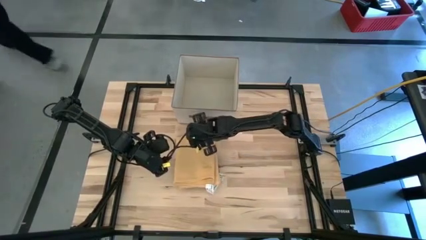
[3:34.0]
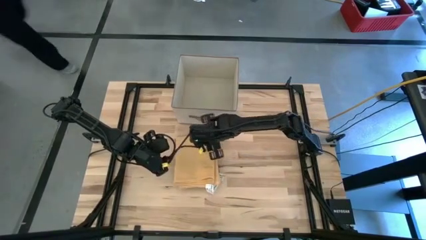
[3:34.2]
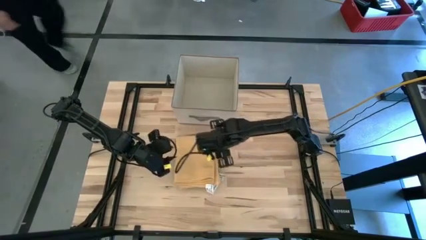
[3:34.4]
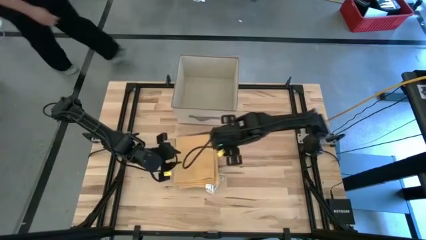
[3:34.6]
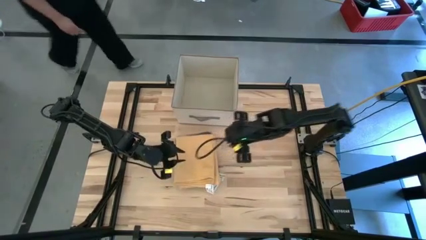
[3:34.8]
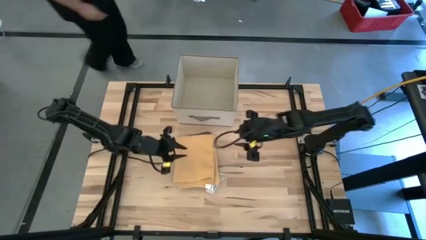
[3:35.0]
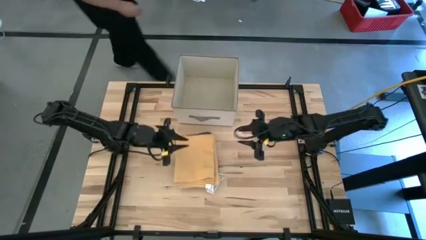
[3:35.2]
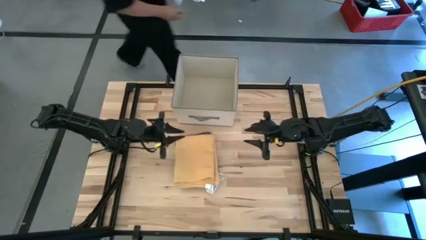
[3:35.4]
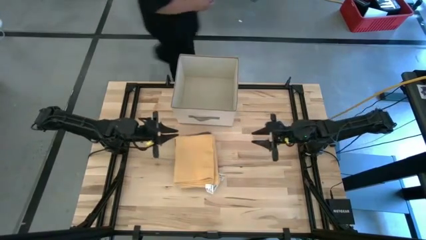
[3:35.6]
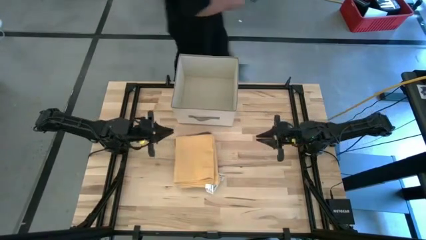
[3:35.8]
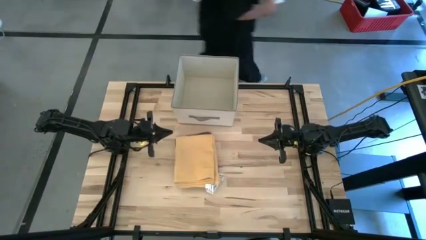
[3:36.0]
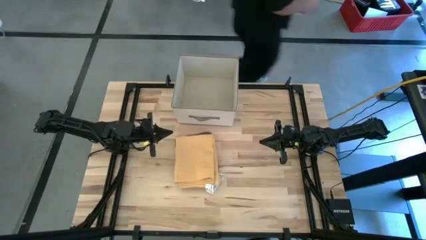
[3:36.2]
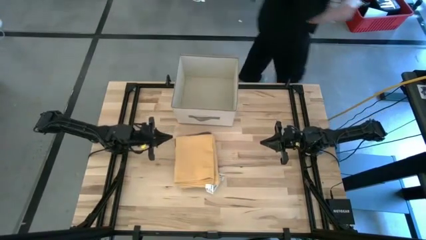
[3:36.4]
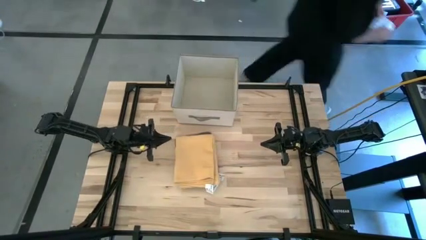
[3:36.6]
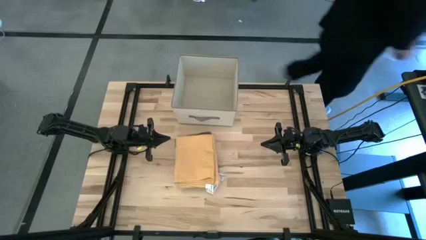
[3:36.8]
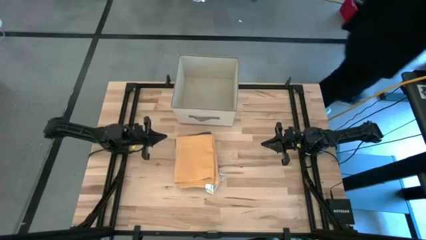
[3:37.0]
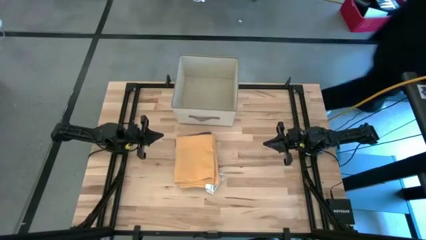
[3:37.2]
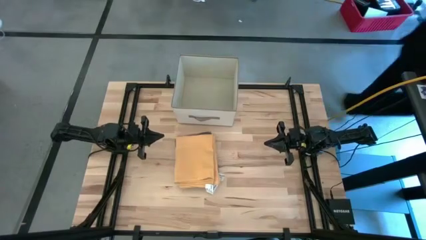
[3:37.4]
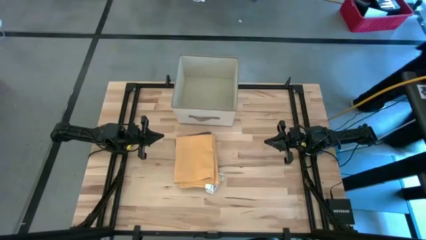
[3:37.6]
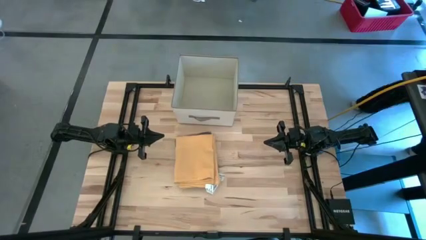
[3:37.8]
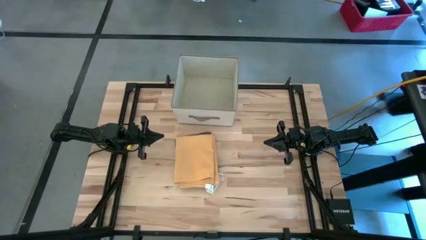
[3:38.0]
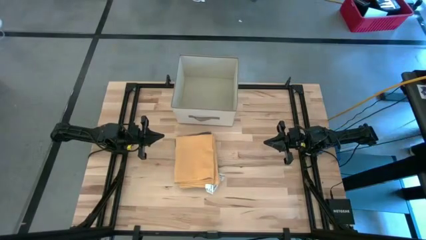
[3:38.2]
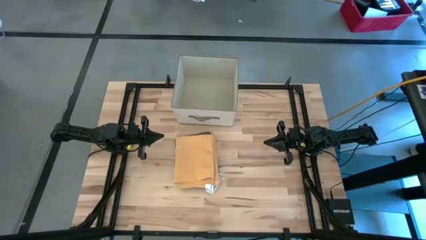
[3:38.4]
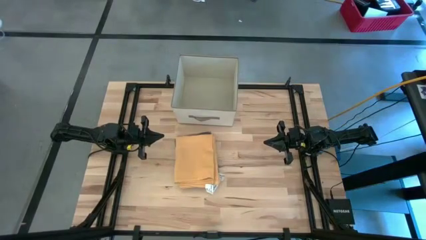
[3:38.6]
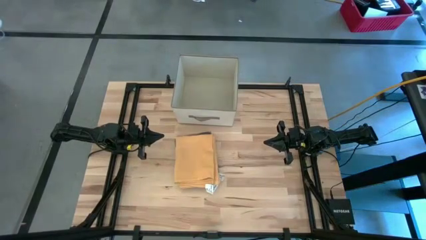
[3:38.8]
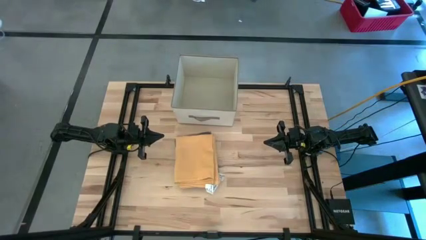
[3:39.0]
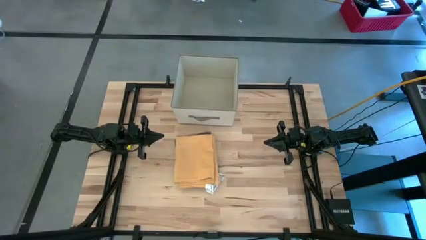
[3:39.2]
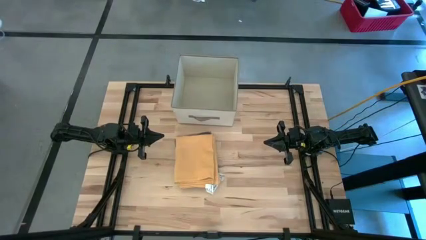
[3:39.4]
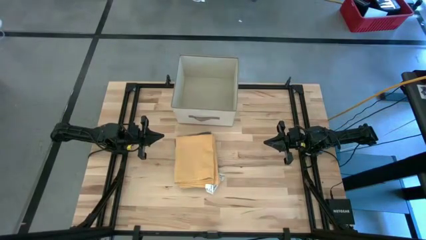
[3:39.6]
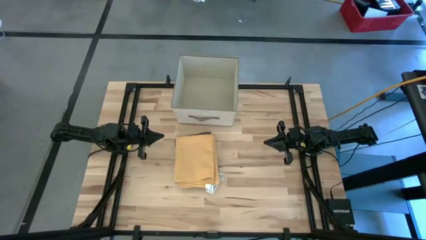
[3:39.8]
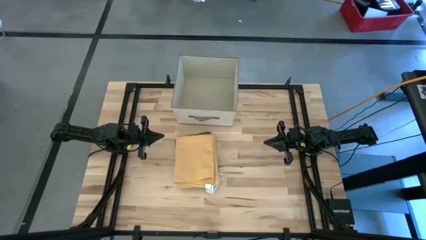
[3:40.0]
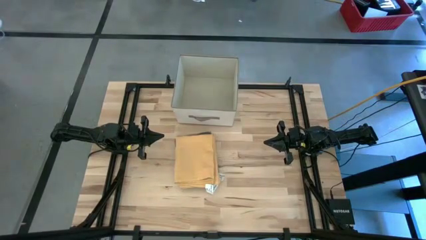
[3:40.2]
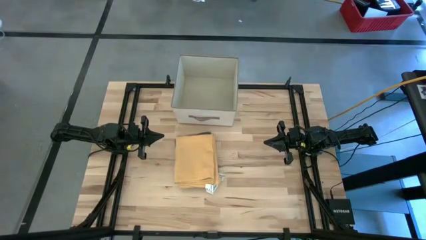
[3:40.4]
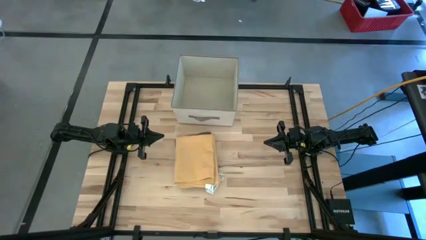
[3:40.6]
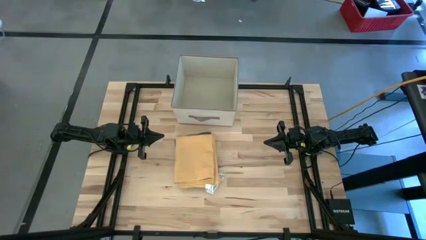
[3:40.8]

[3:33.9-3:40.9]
Task: Fold towel
Return to Home Position

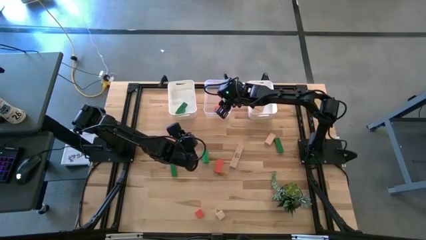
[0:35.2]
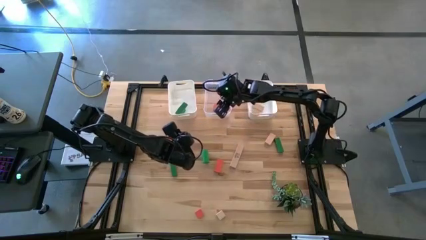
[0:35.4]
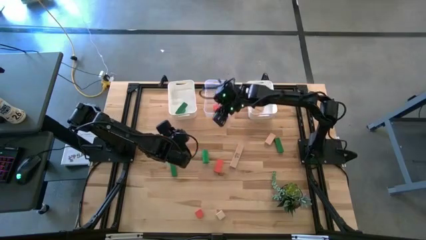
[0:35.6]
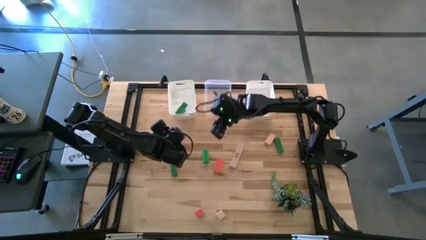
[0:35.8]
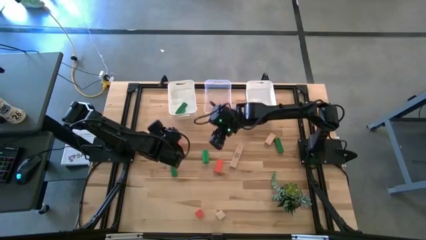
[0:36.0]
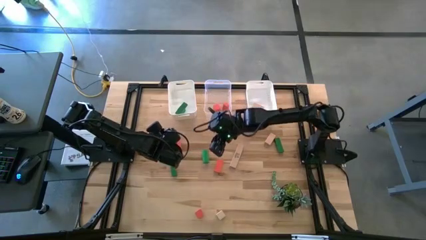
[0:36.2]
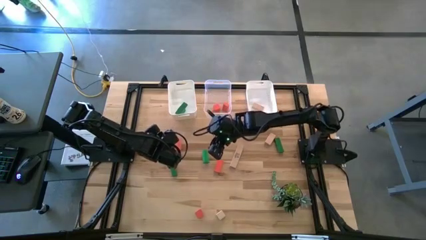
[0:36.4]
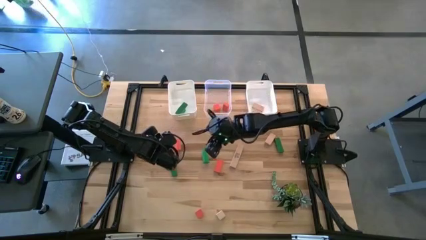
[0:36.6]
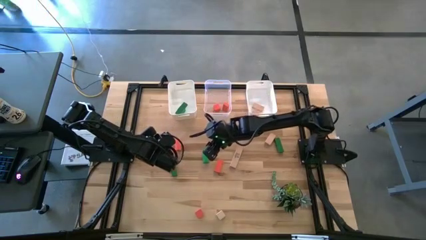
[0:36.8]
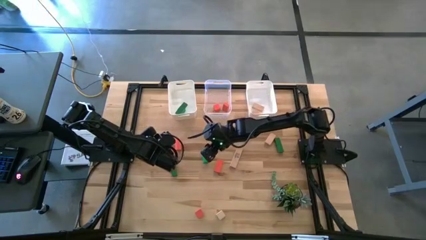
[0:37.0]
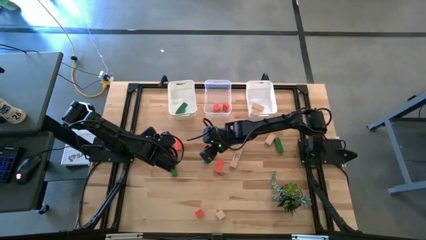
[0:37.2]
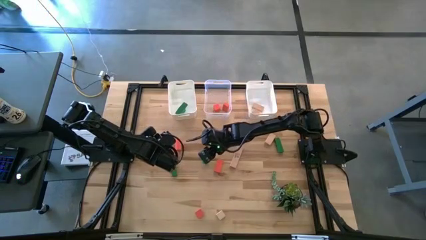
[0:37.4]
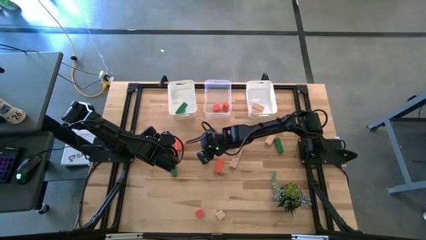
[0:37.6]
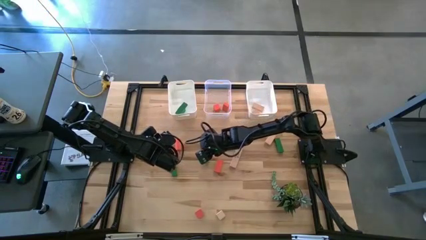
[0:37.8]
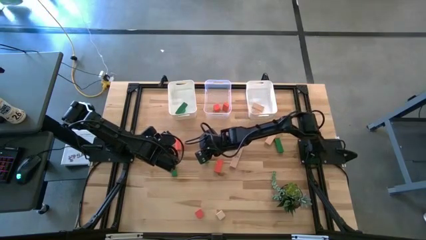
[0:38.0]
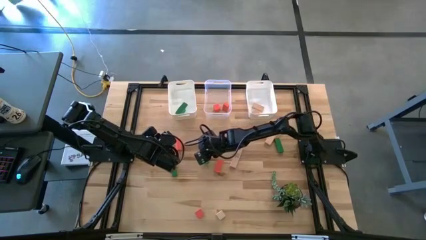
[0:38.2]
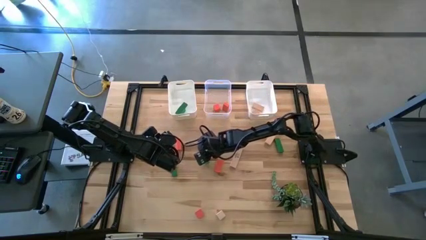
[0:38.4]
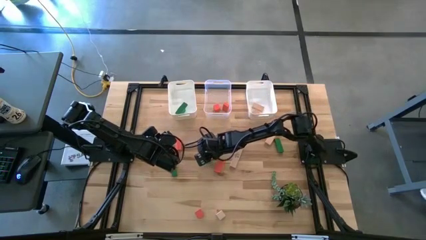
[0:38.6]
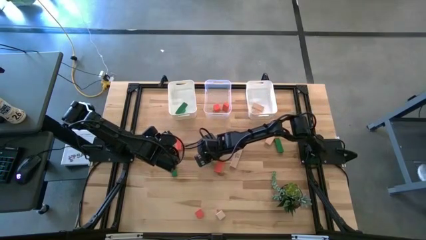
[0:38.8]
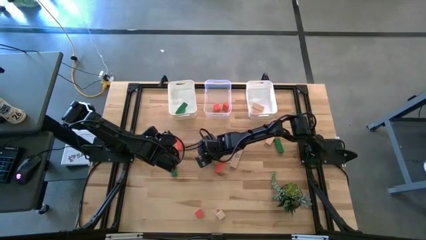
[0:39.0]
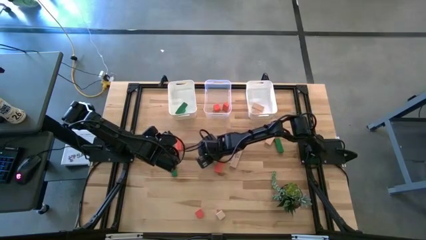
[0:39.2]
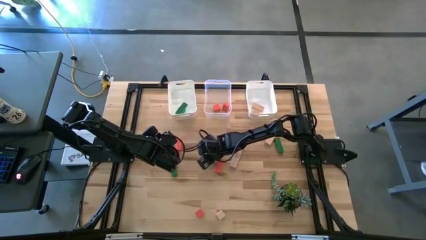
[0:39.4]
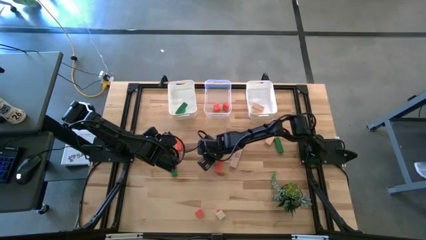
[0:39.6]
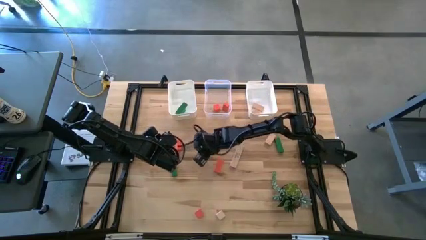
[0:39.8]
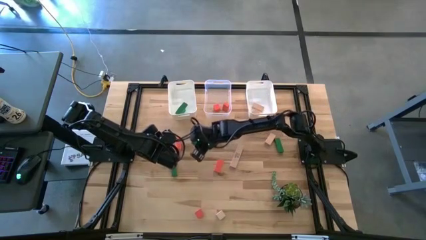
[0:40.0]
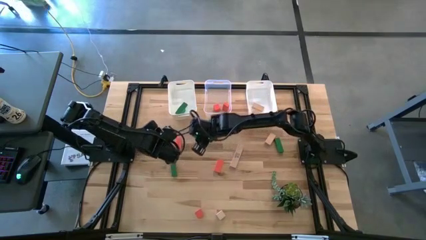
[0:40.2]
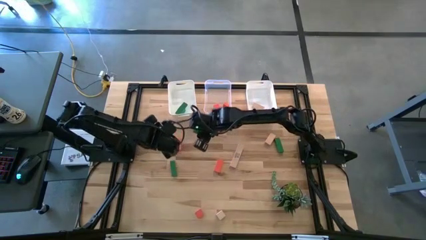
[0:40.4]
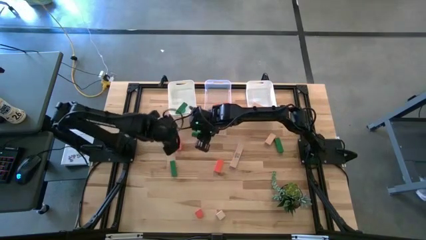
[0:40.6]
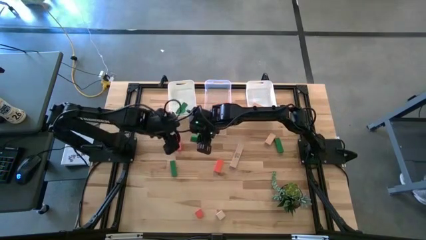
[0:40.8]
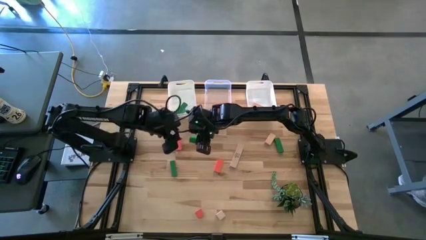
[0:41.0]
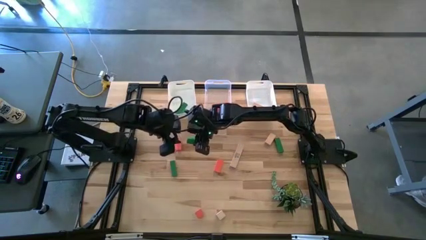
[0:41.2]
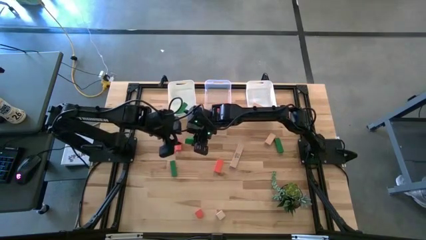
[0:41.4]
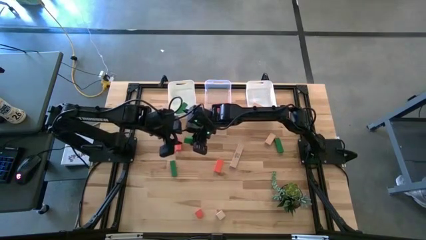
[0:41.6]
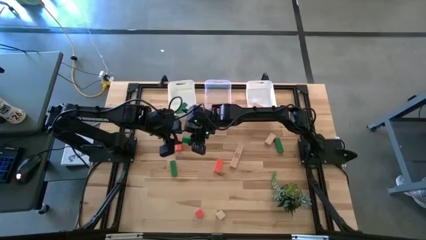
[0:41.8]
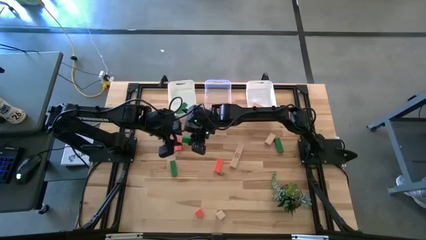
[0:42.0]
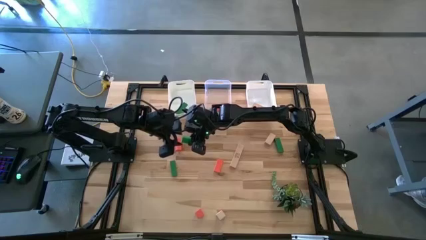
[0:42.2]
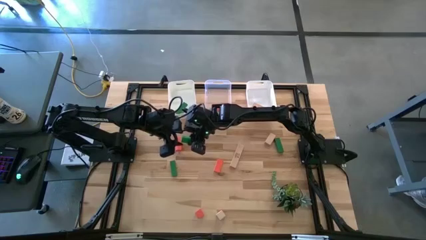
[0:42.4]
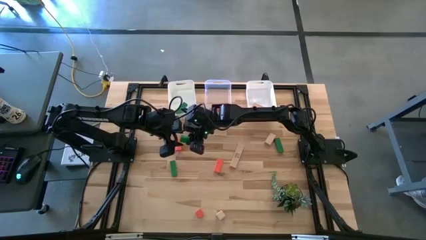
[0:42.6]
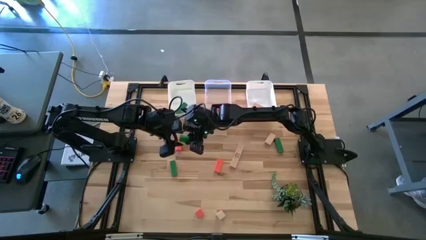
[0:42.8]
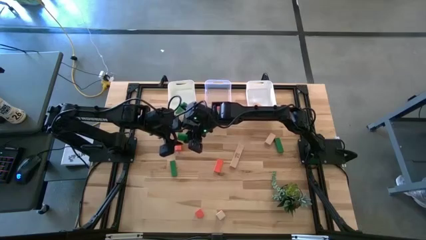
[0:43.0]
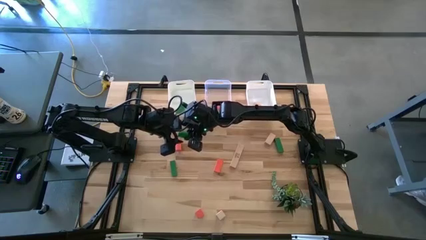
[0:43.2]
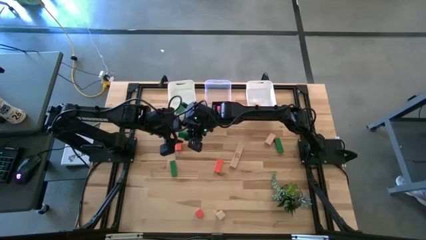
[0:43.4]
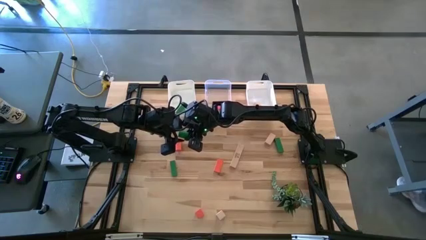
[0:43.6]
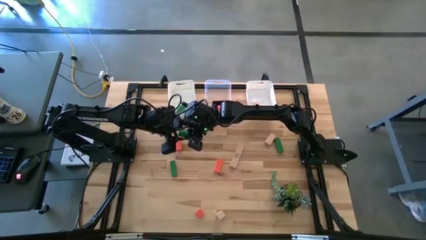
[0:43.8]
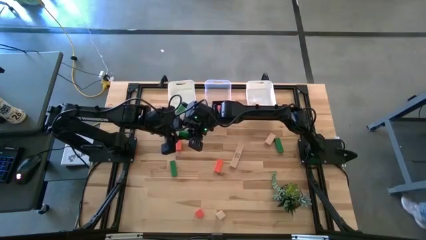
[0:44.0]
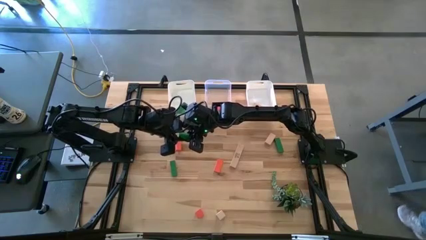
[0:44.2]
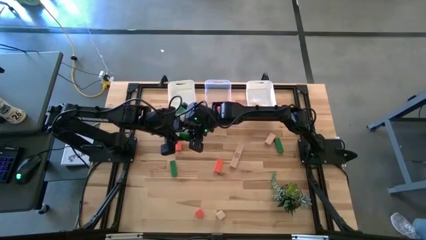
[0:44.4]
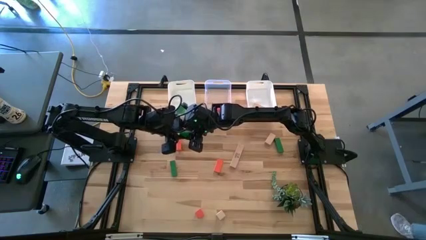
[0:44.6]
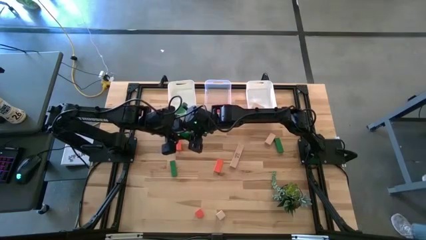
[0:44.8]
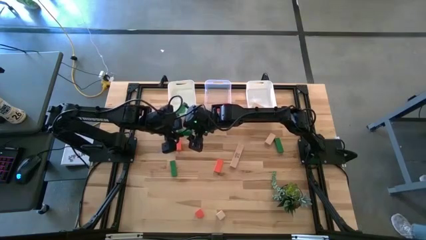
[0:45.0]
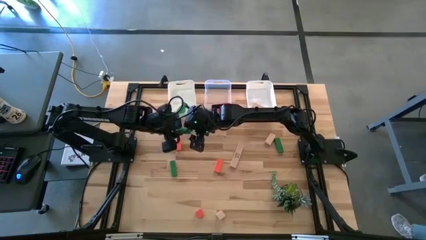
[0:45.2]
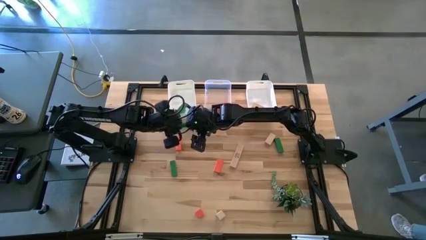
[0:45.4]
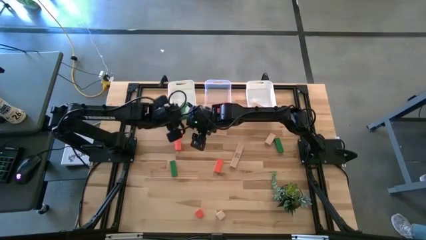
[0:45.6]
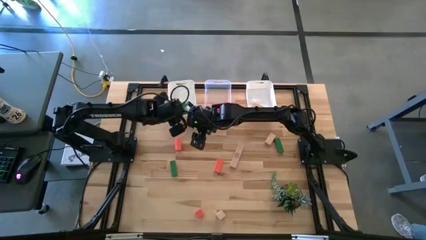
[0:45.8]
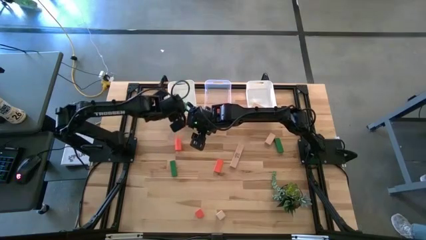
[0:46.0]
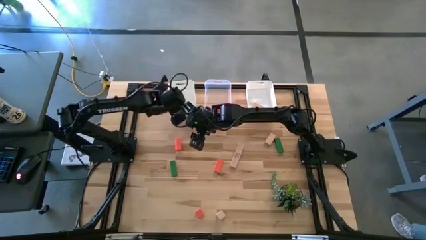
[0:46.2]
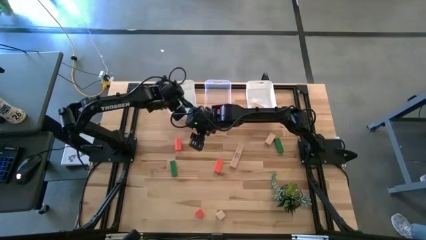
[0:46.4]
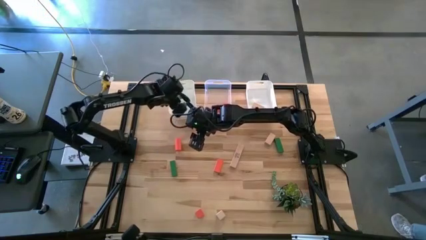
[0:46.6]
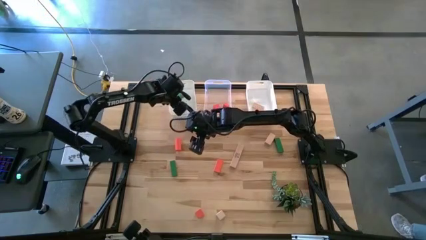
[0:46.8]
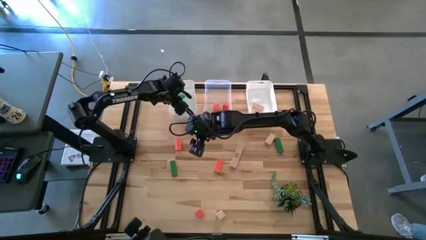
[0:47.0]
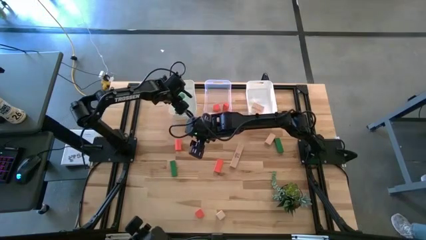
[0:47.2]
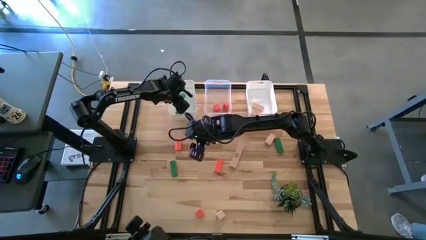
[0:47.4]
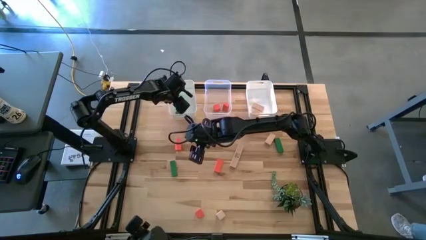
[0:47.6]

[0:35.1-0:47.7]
Task: Sort & place blocks by color
Put the green block into the left white bin
